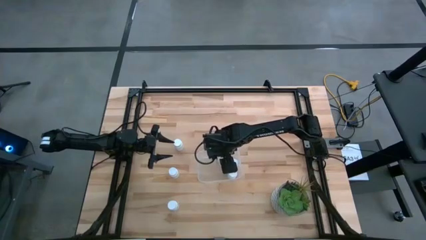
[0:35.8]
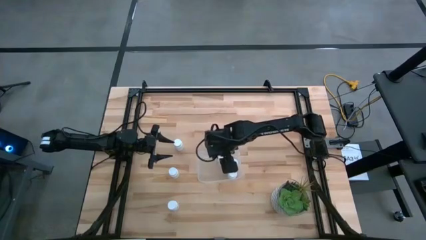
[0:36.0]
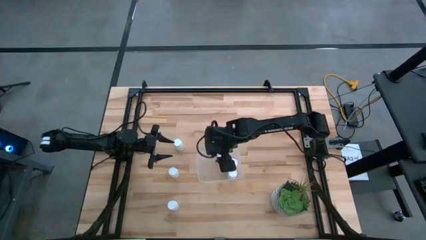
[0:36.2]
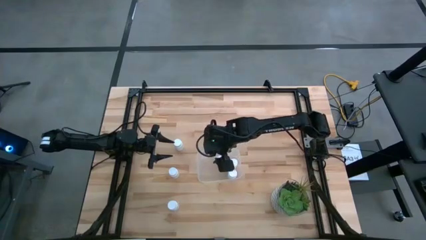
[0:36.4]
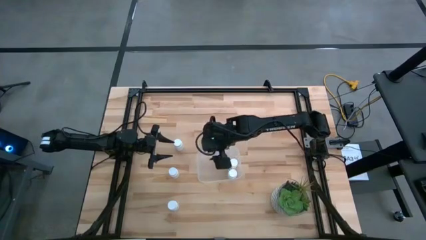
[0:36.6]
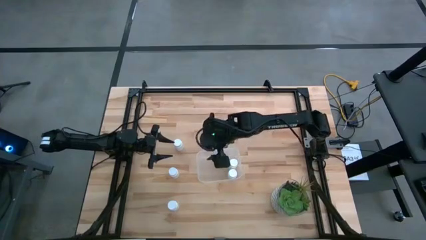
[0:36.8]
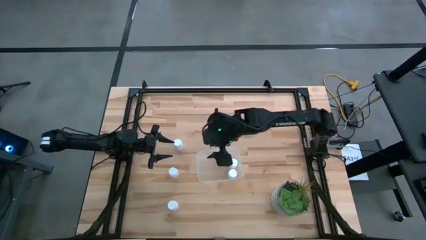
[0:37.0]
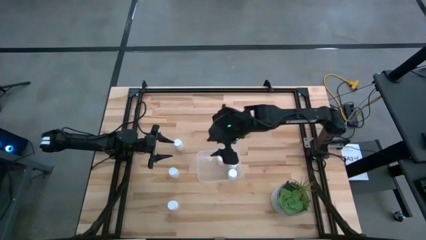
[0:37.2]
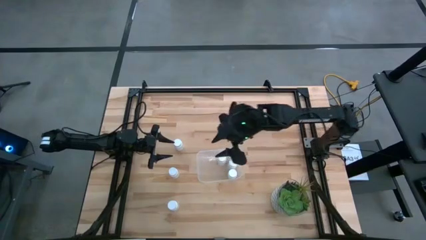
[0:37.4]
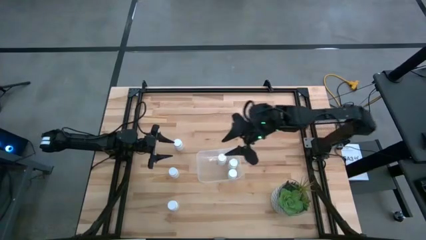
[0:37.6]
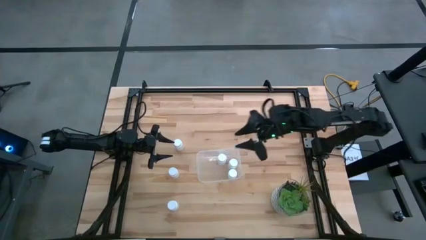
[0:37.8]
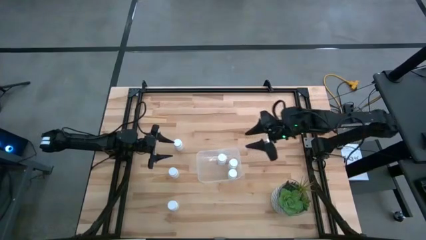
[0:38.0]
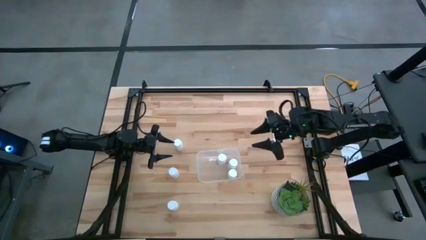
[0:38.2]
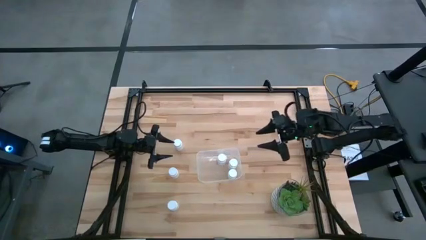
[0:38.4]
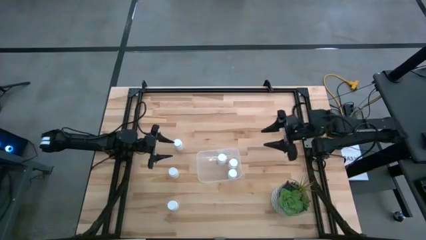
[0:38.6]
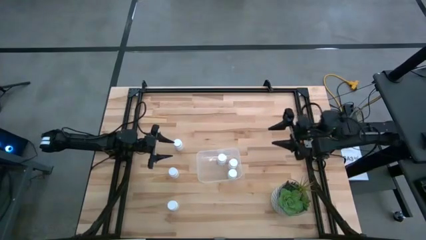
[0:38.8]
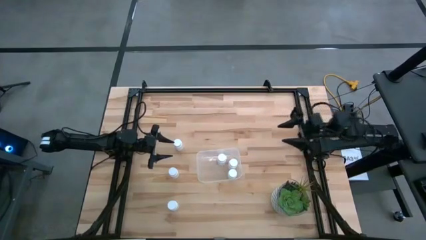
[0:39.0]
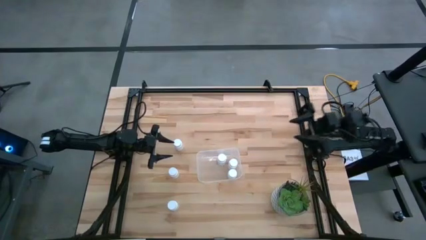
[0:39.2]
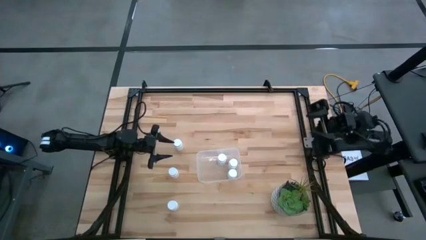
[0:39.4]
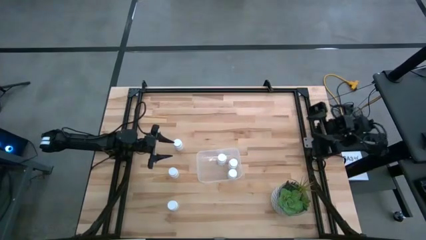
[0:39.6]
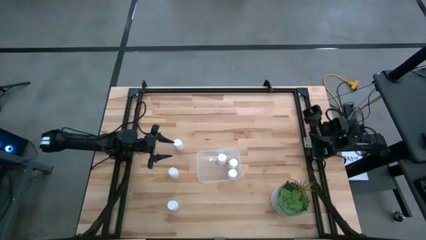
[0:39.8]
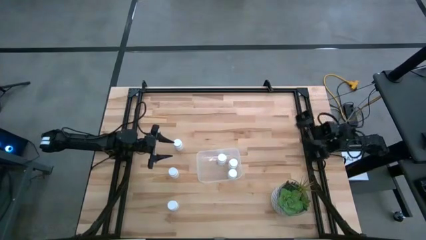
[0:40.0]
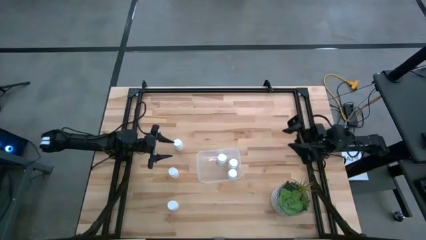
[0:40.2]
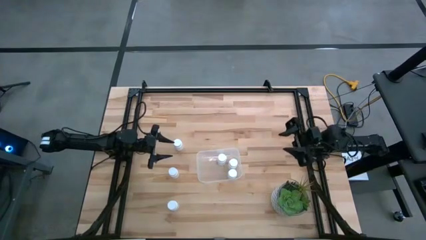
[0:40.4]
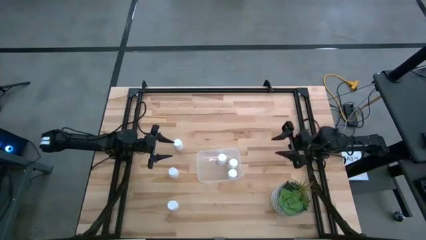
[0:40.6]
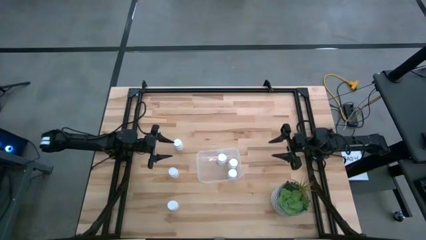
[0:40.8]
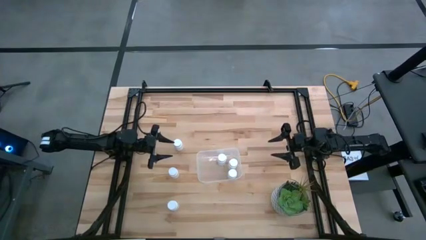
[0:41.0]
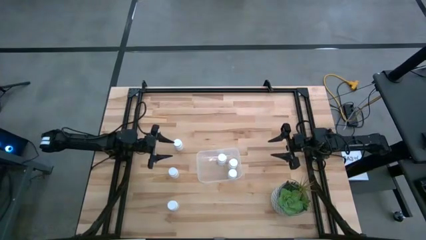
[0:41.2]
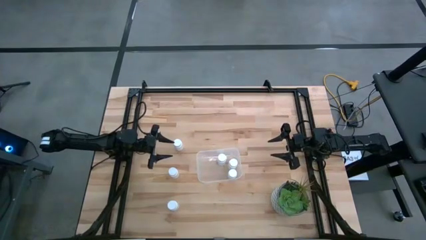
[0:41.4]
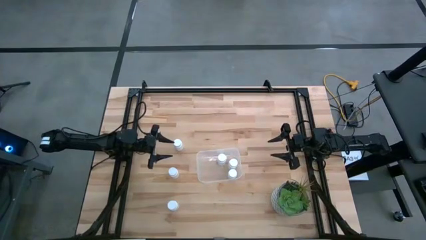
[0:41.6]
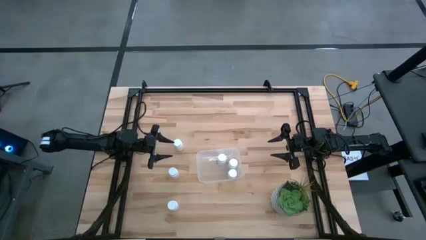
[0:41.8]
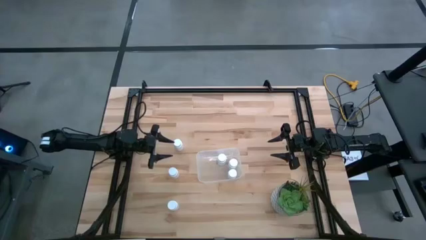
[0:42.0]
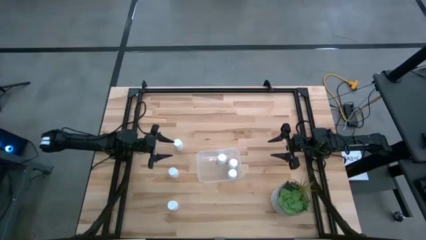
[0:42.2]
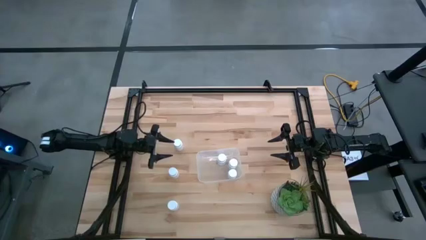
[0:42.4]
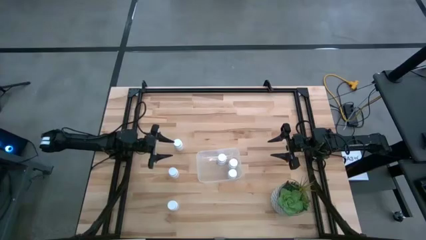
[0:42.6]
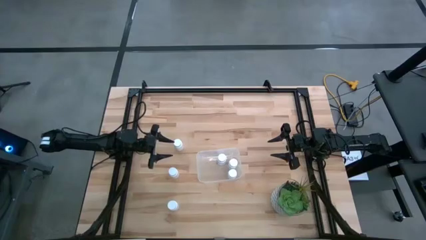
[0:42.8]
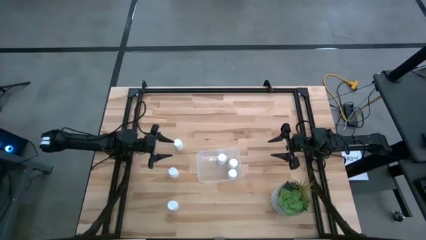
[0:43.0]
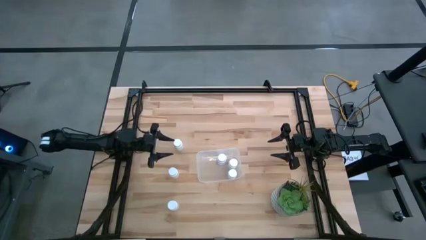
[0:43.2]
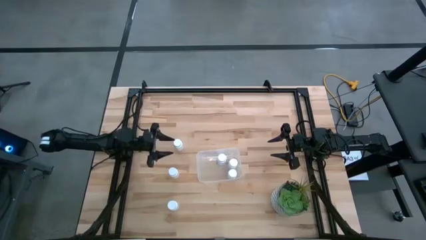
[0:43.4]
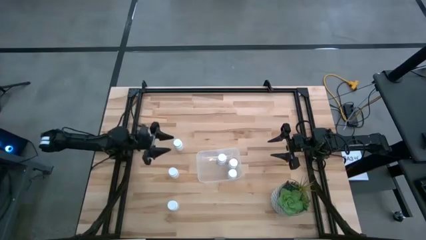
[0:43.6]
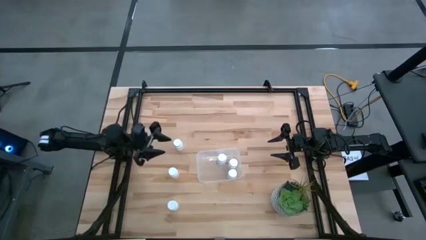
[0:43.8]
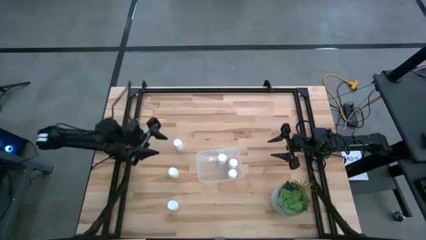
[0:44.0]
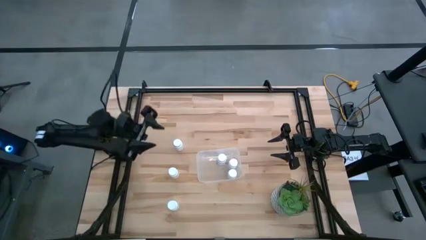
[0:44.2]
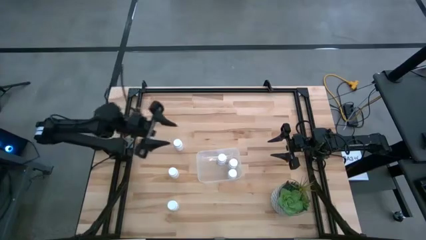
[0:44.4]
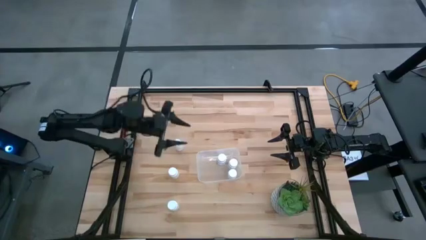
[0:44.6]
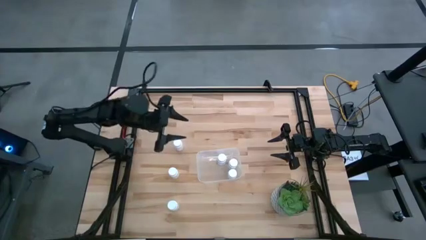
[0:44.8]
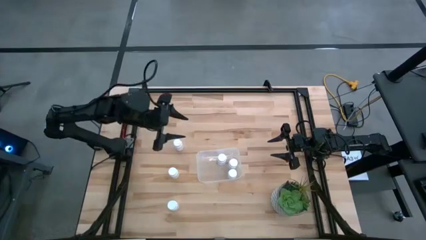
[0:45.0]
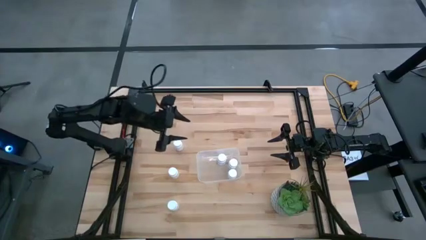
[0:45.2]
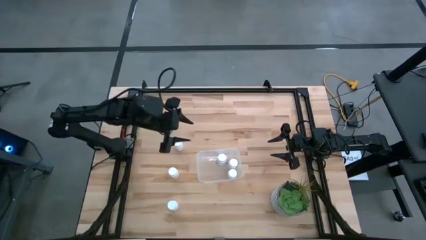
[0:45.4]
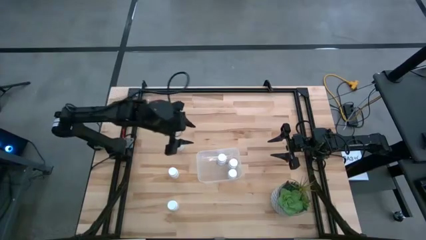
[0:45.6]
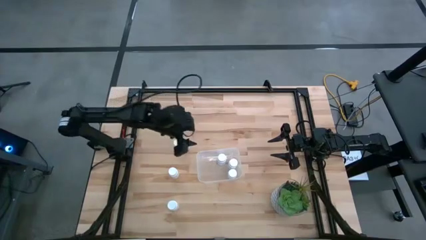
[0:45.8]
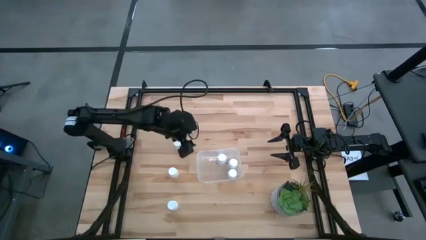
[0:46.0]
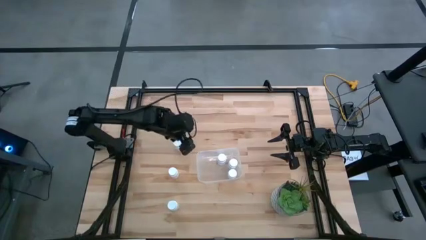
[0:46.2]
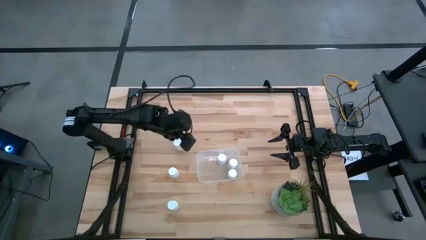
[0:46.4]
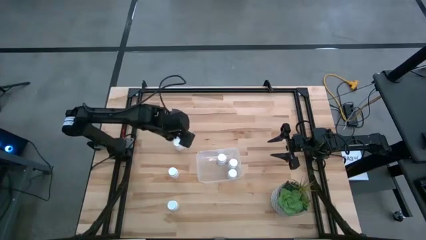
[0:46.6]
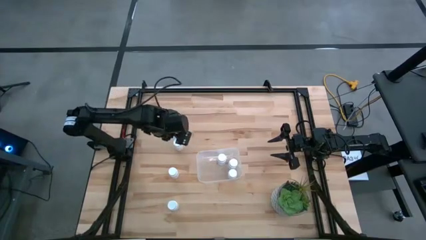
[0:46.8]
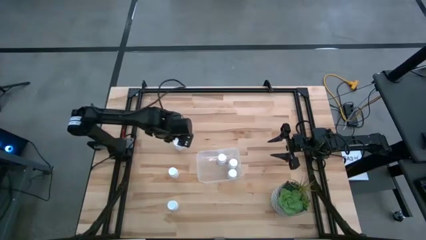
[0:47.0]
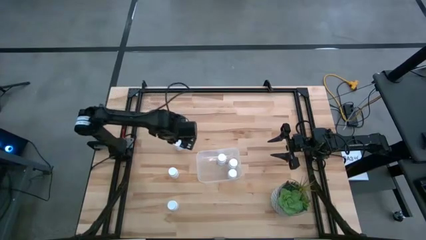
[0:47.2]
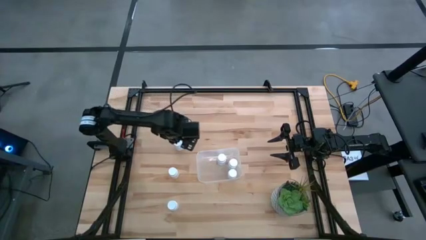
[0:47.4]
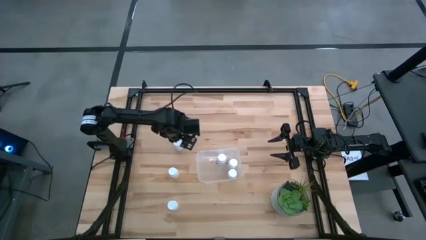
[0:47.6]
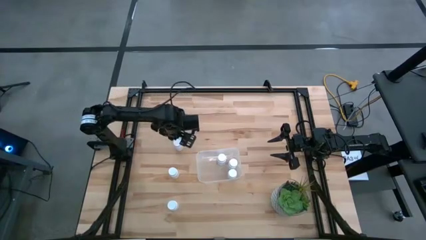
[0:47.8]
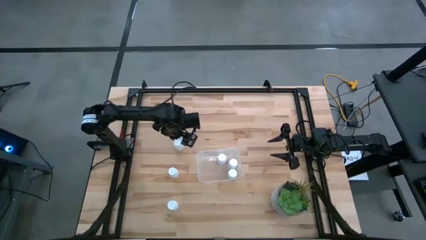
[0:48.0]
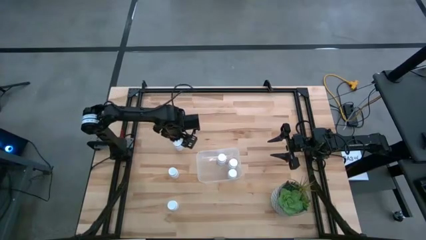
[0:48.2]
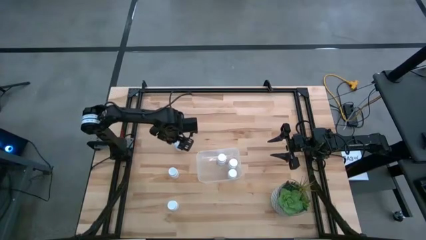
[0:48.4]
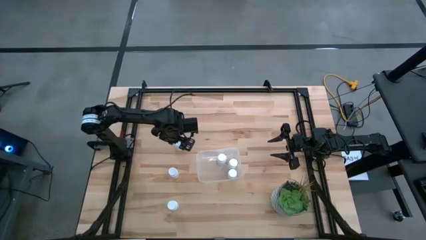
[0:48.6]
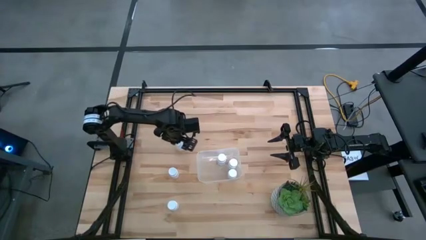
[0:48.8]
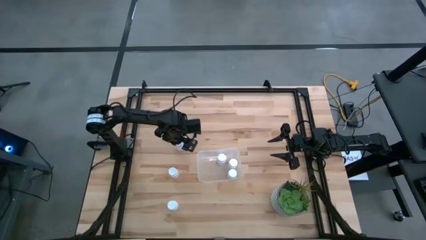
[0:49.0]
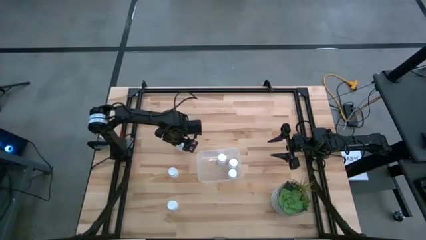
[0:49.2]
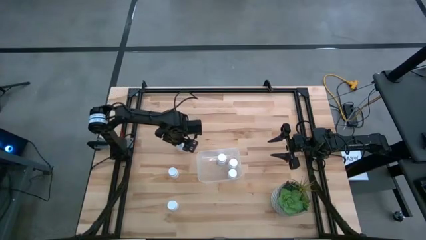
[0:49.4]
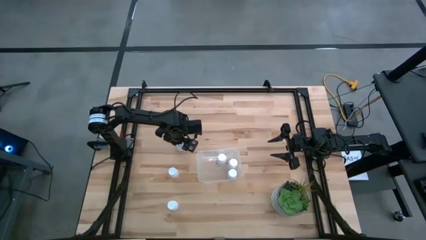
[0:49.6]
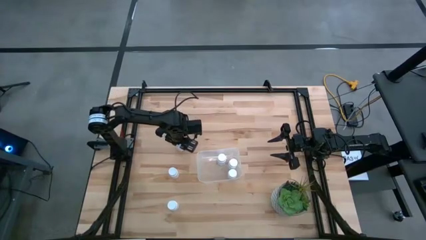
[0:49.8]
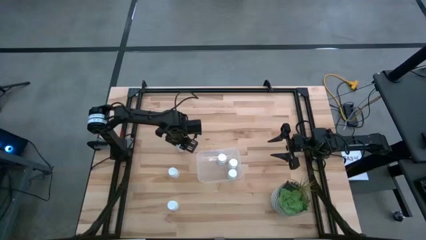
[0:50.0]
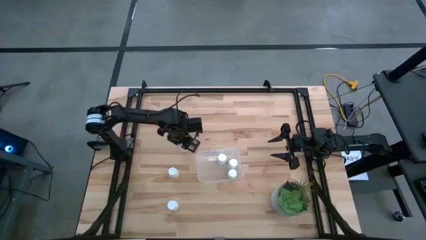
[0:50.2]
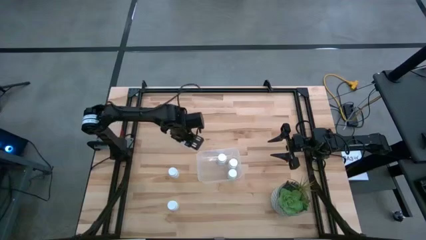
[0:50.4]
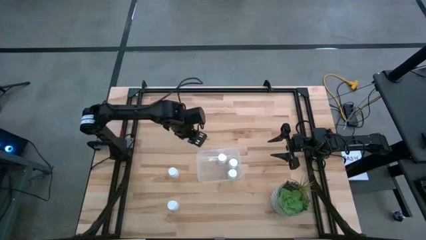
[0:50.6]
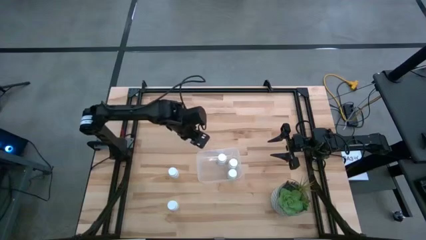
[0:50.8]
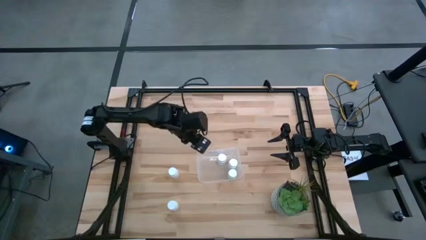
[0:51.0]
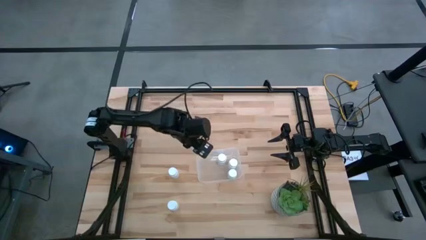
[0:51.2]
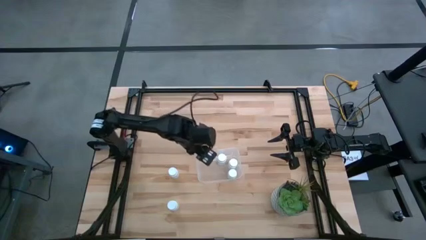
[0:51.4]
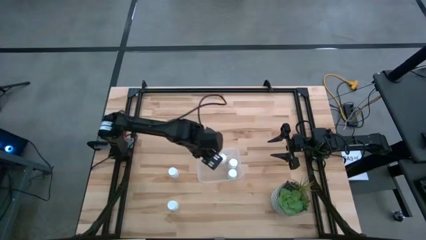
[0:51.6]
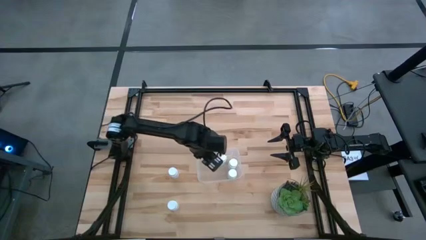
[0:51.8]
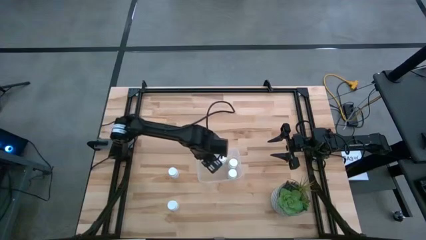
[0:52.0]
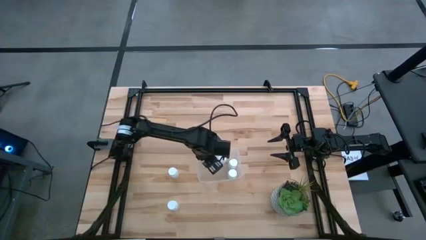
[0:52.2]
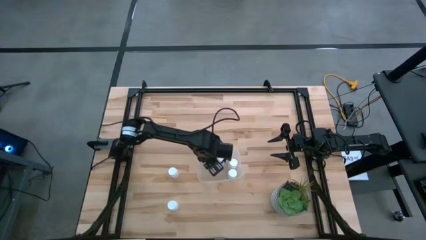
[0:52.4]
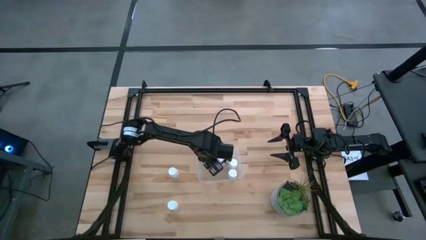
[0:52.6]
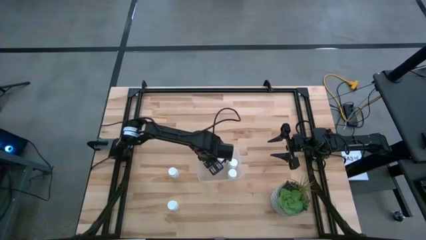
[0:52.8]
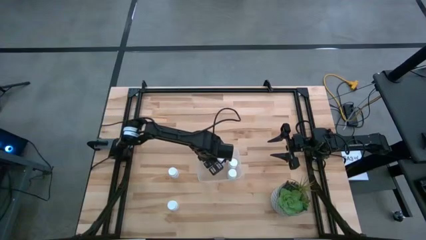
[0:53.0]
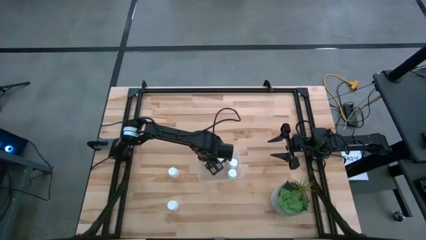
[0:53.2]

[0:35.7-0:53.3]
Task: Pick and place pill bottles into a basket
Put the white medicine bottle into the transparent bin
